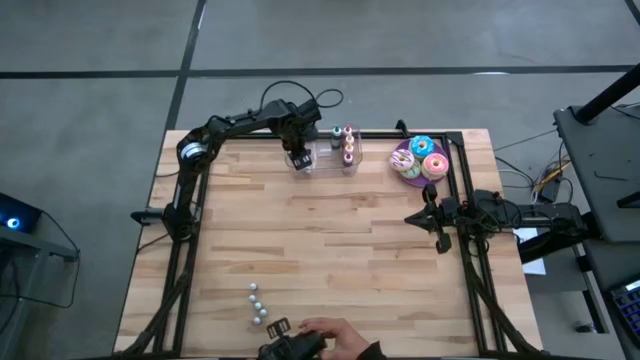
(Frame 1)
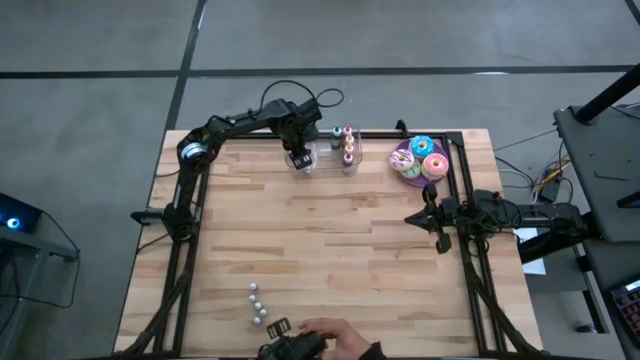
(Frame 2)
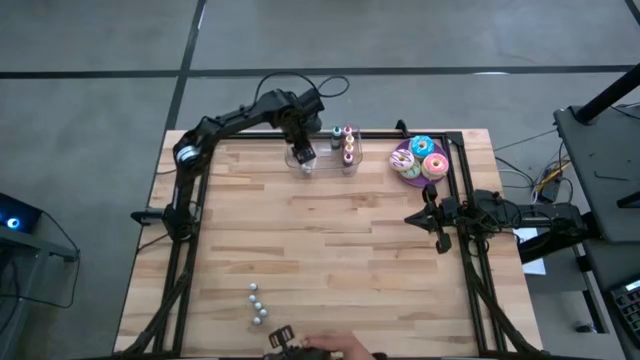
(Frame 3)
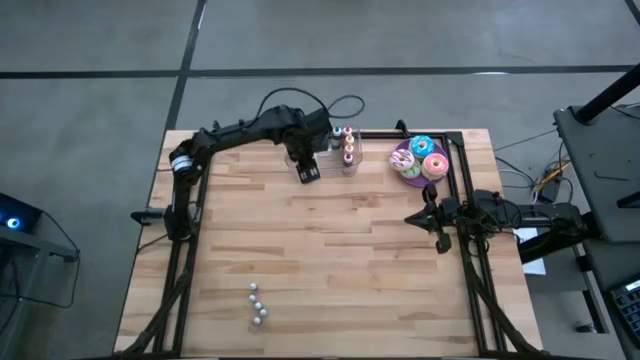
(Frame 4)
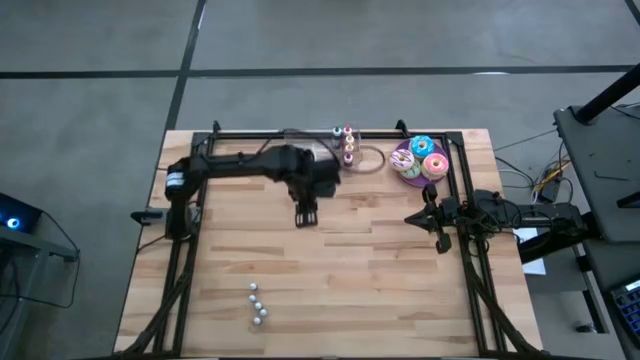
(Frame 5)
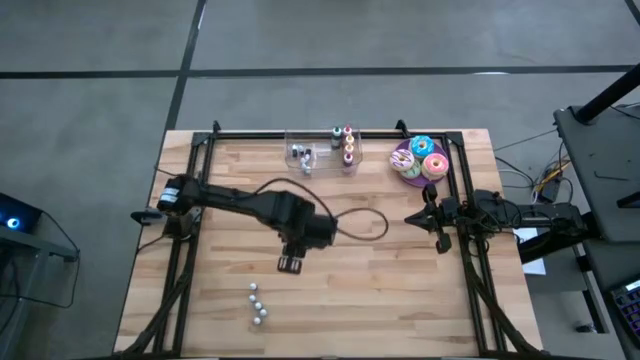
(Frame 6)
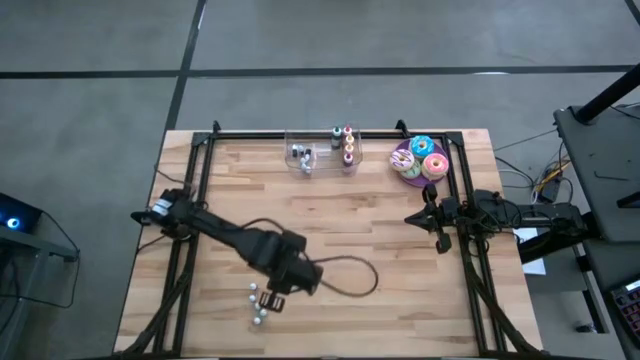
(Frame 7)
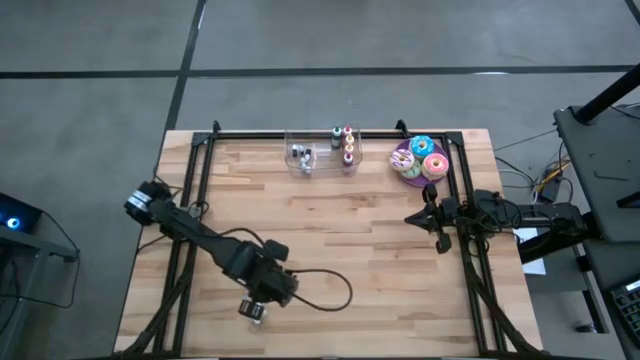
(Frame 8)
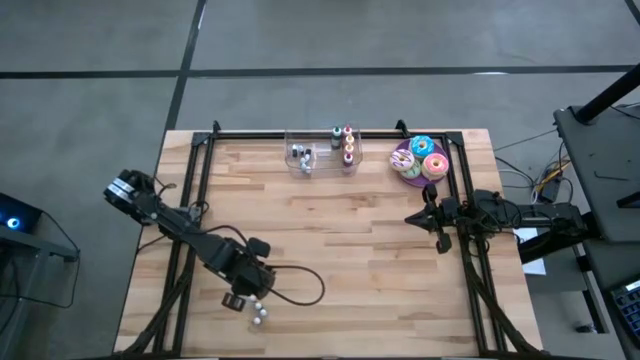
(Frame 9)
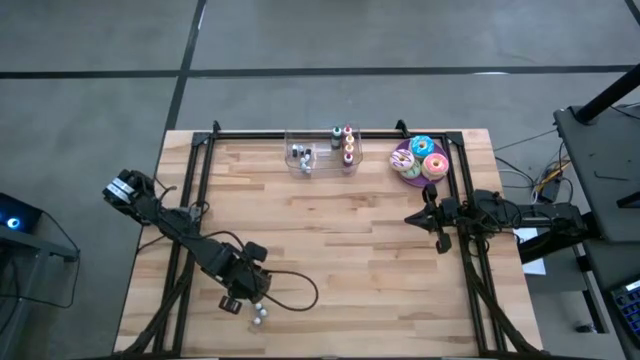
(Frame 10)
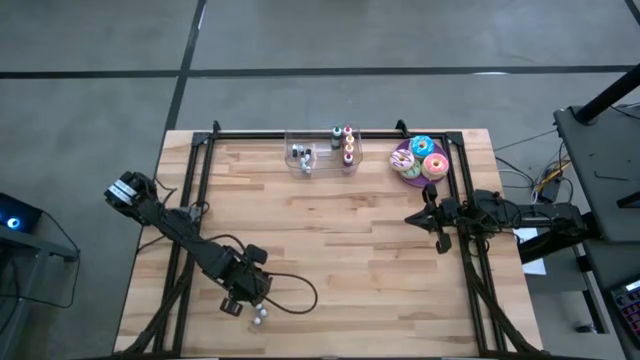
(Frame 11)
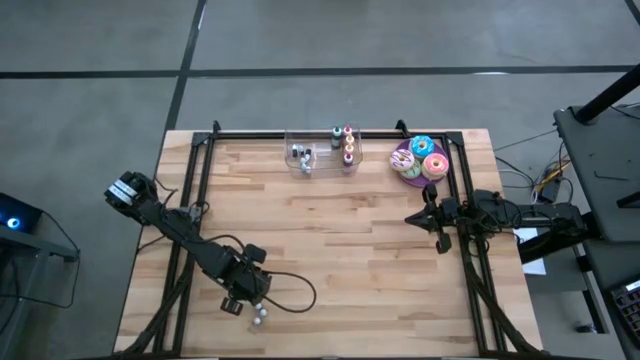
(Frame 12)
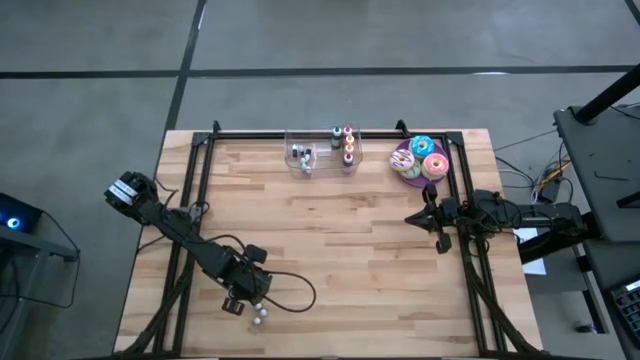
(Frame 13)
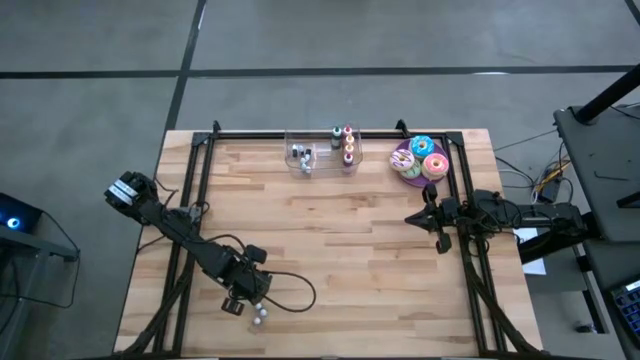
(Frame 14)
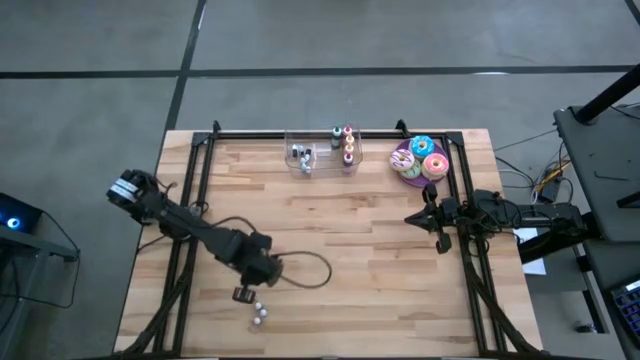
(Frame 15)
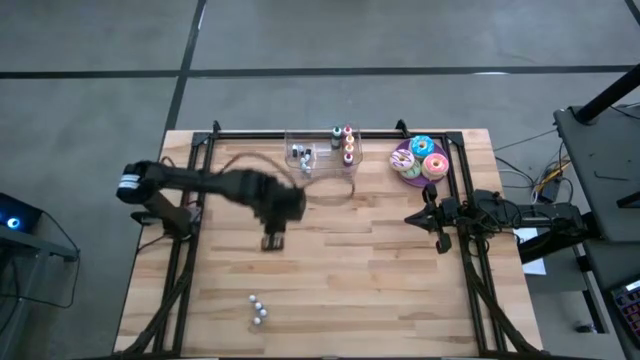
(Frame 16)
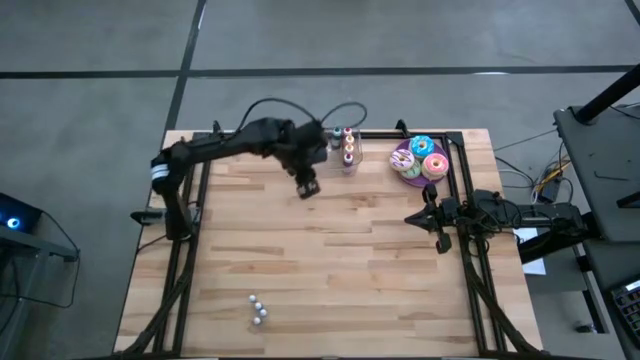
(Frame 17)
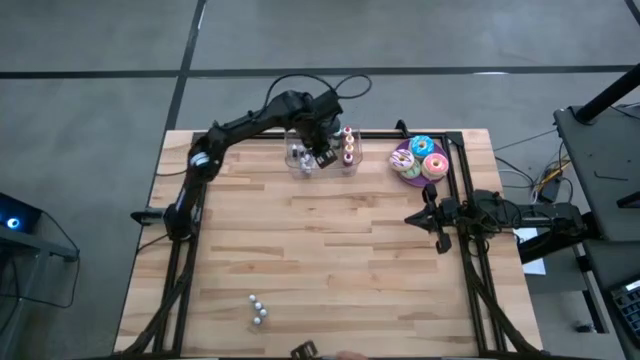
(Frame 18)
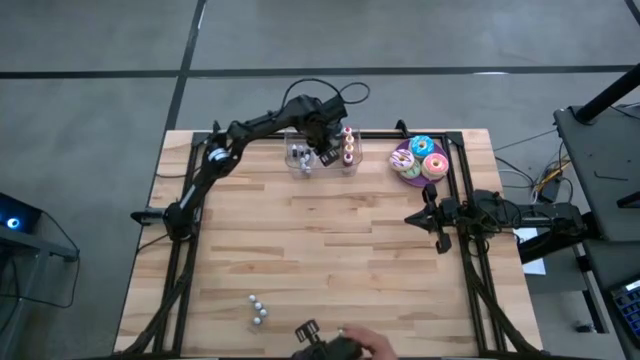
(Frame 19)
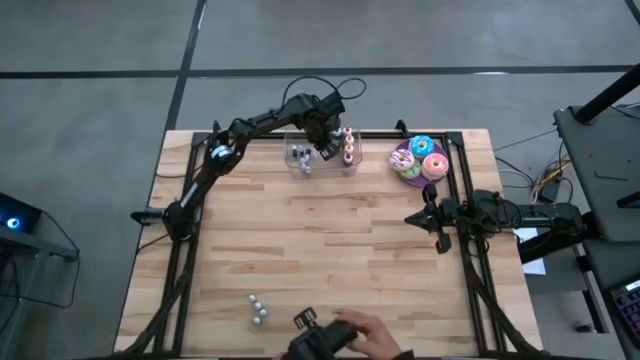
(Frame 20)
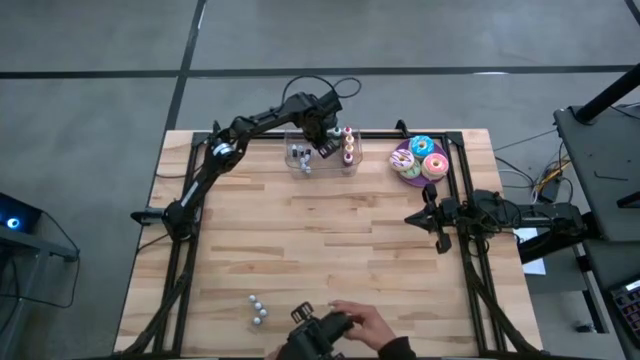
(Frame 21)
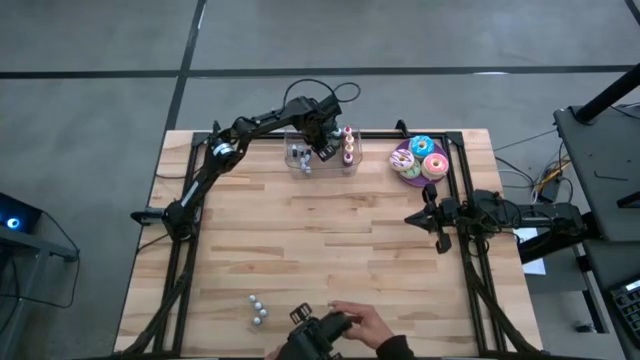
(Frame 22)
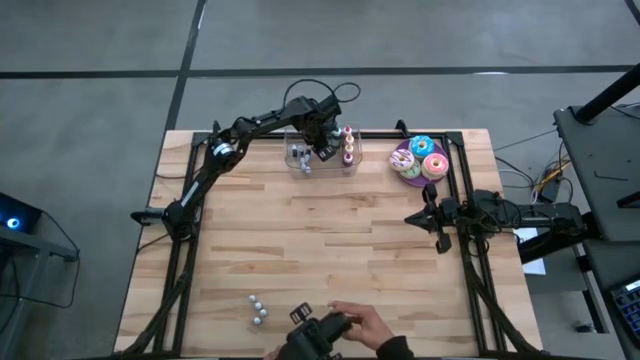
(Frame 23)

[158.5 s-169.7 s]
Task: Pick & Place food coloring
Put the pink small food coloring bottle into the transparent bin

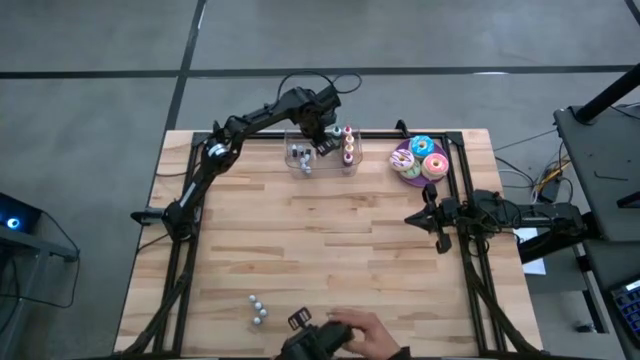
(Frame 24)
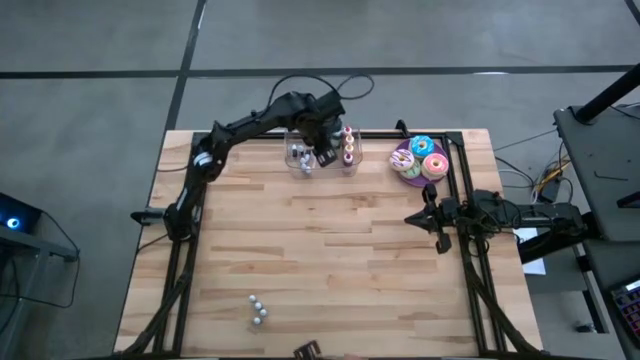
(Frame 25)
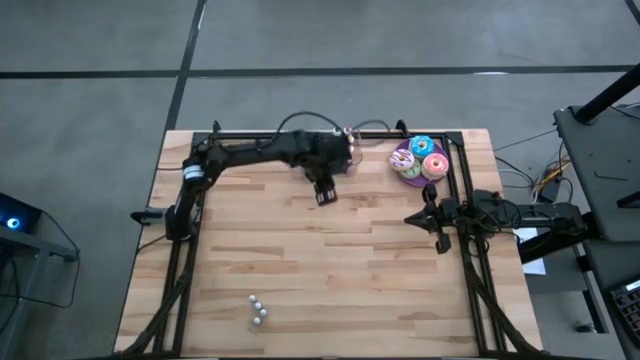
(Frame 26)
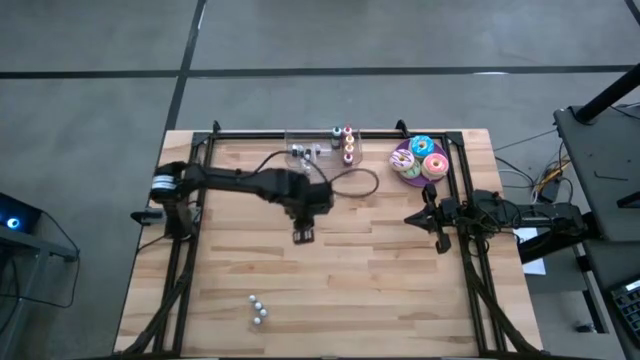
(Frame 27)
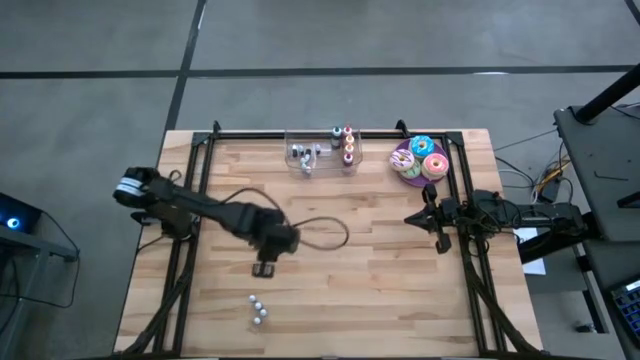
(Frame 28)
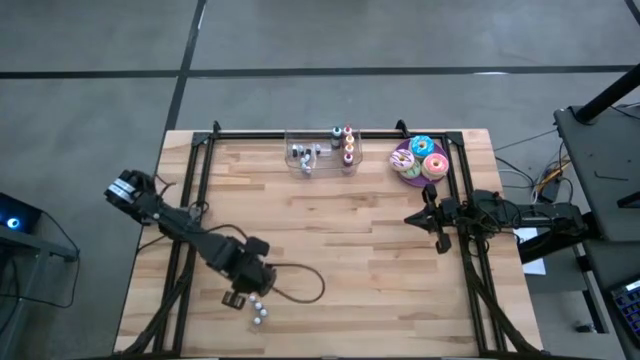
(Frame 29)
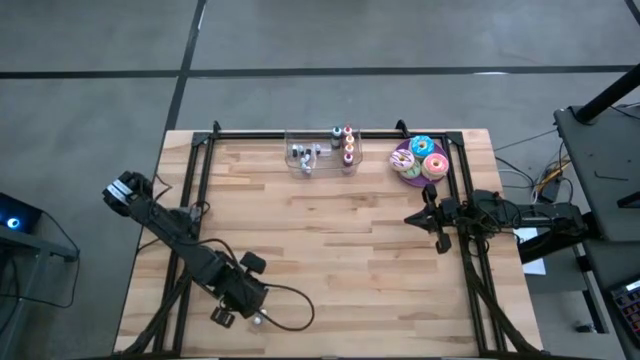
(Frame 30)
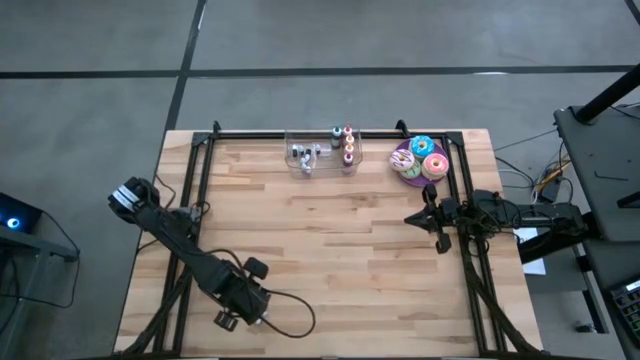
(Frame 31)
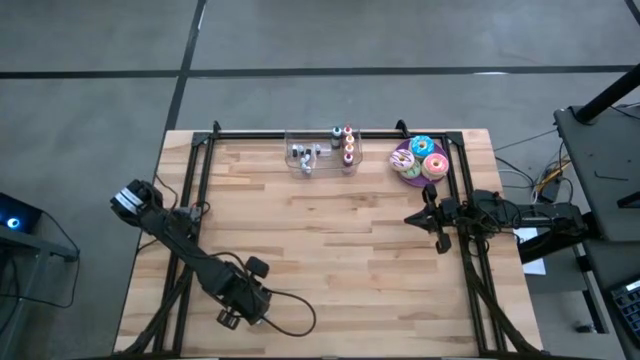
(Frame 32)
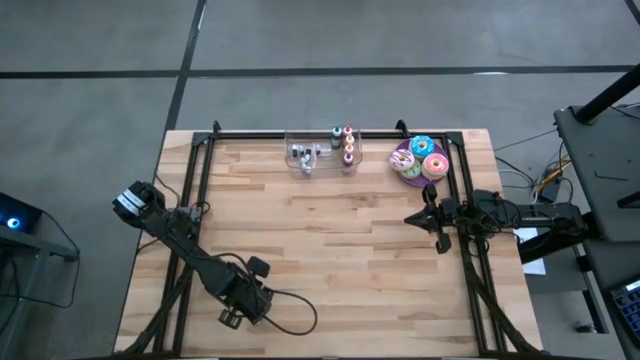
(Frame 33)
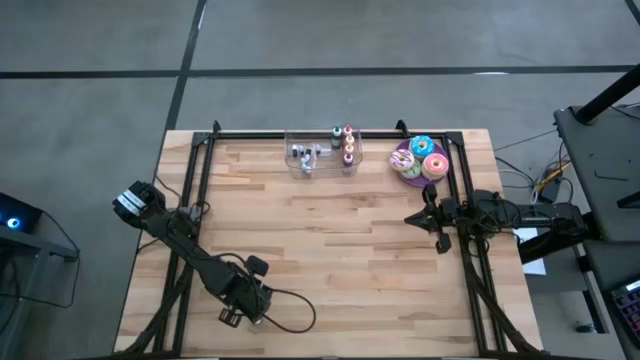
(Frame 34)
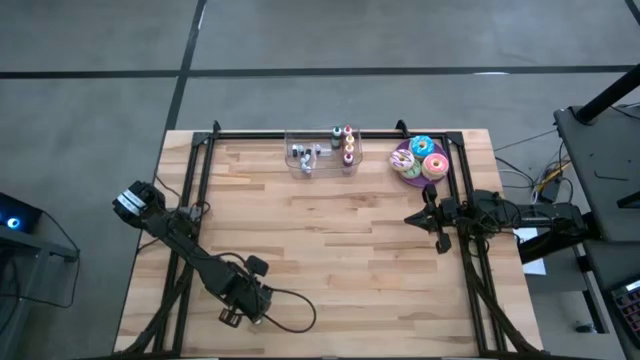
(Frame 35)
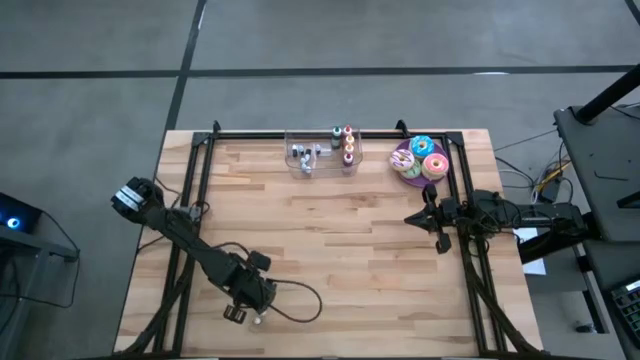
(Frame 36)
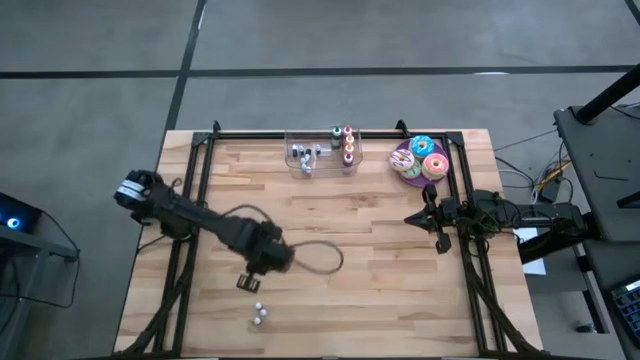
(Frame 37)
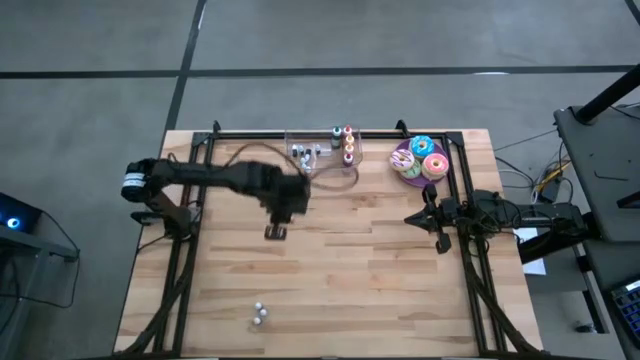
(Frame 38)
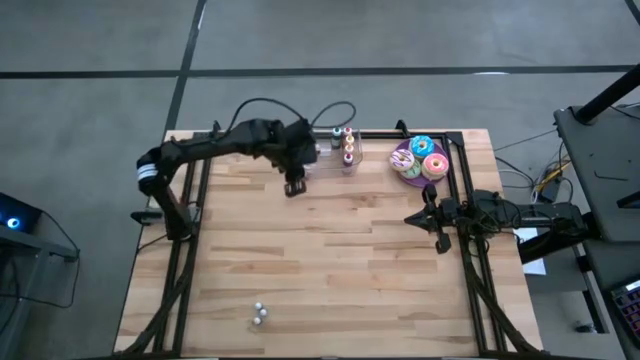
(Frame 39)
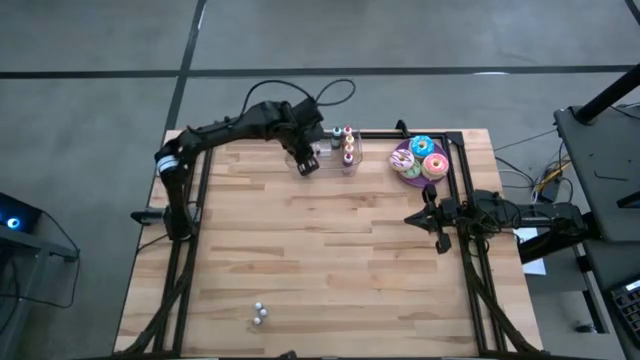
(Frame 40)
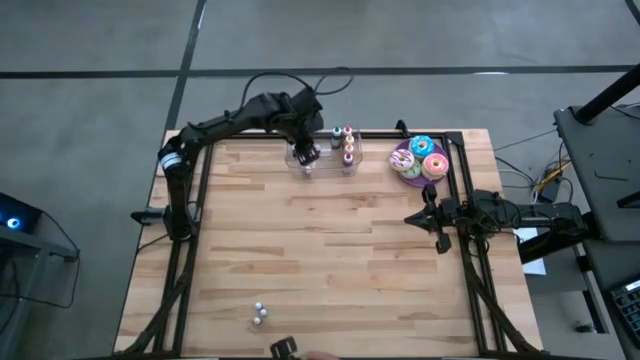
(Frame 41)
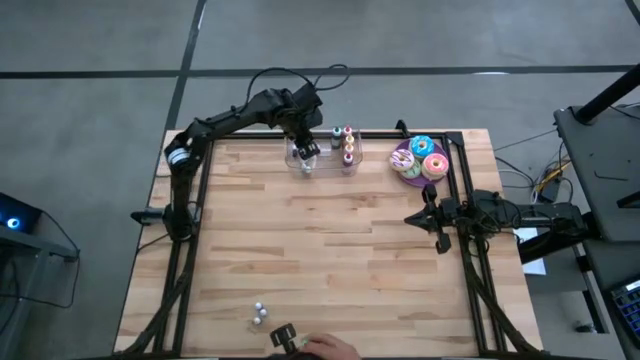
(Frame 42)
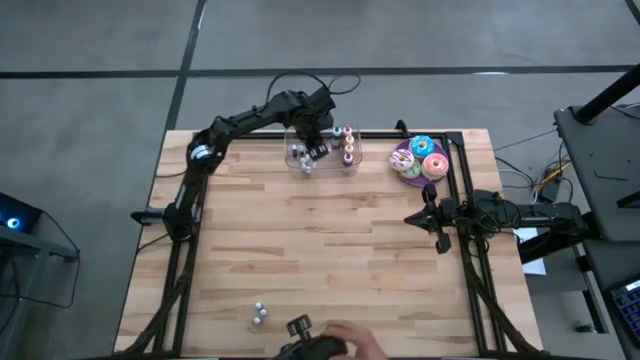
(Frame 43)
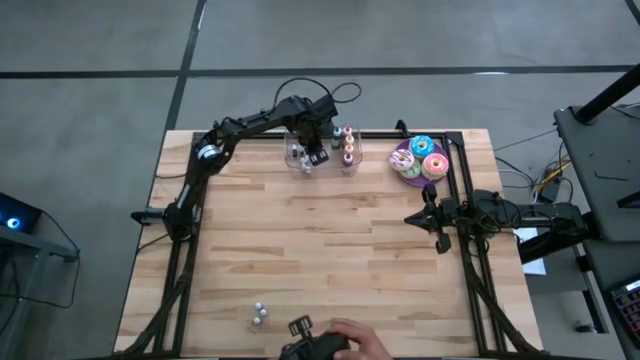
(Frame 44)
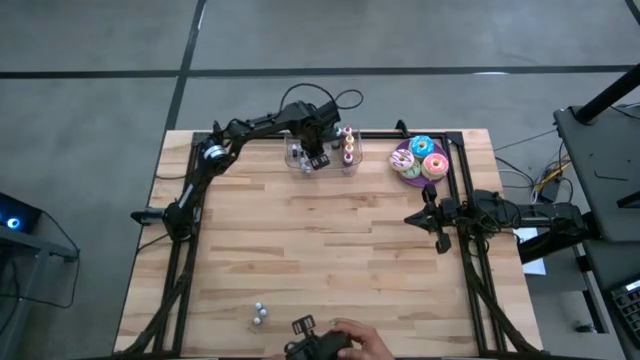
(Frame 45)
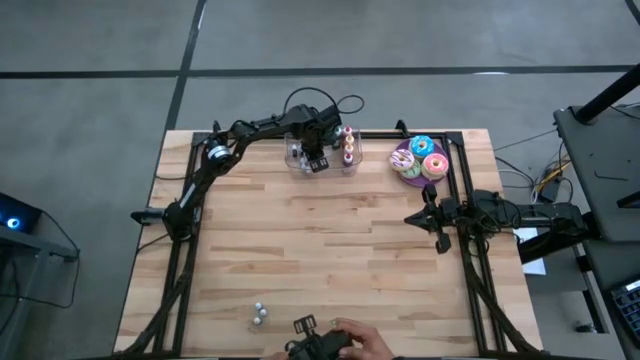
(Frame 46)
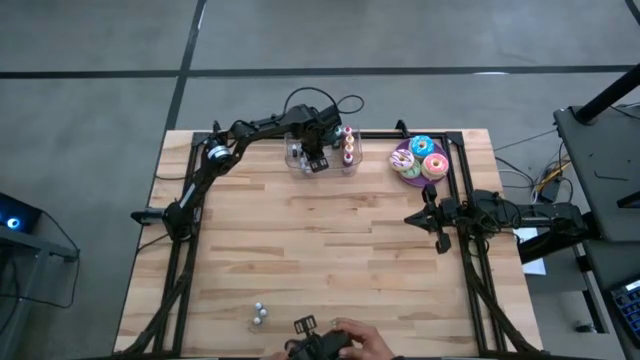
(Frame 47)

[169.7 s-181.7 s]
Put the small top red food coloring bottle into the transparent bin
